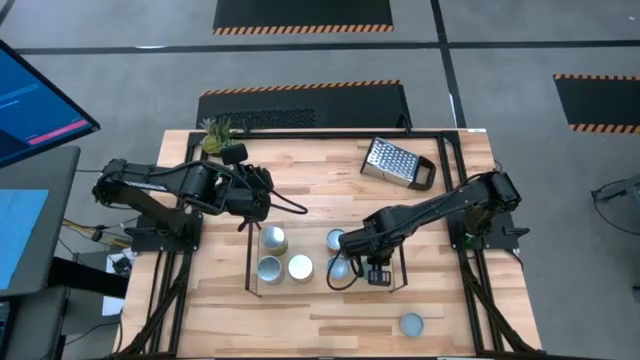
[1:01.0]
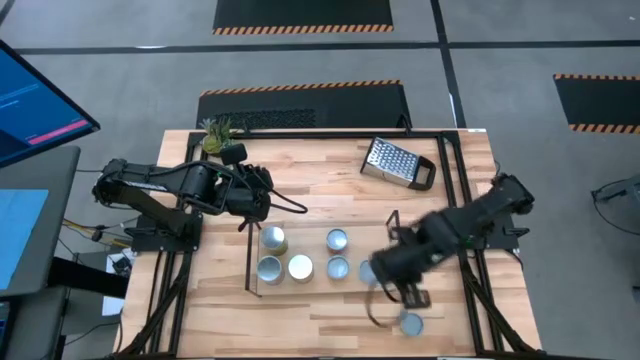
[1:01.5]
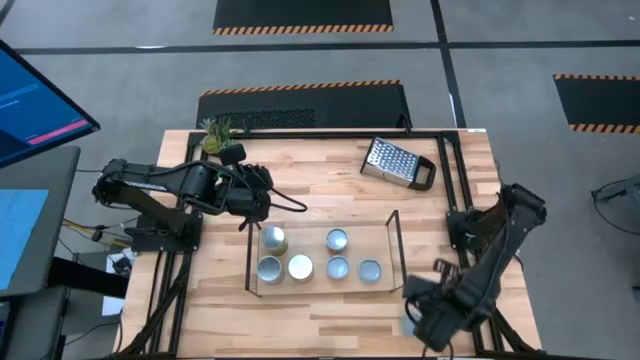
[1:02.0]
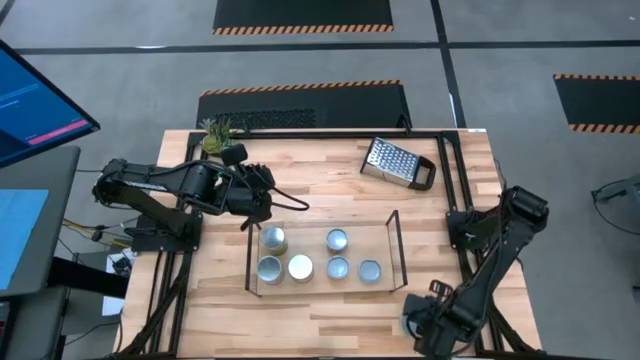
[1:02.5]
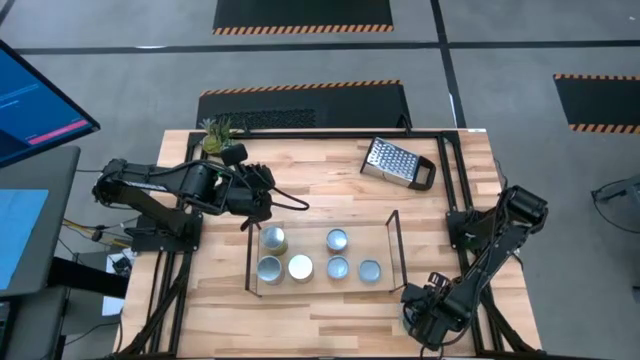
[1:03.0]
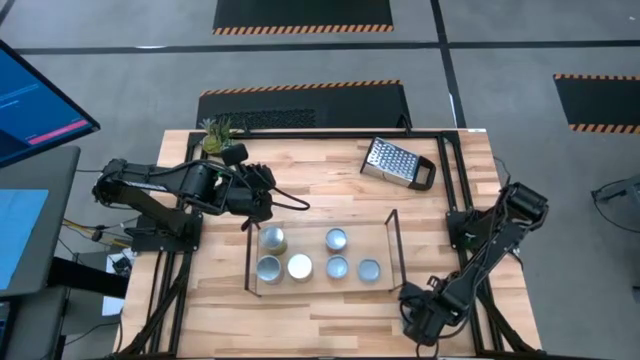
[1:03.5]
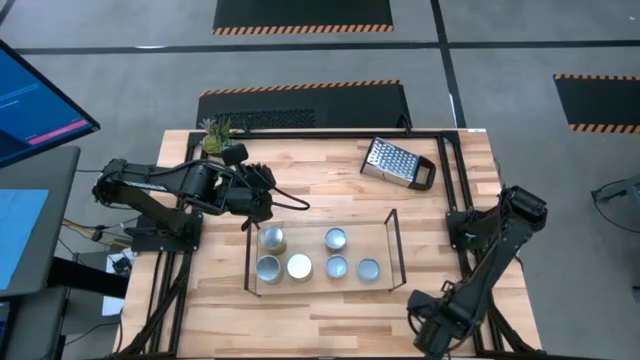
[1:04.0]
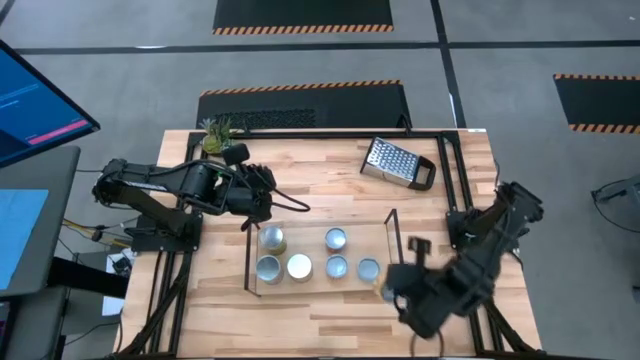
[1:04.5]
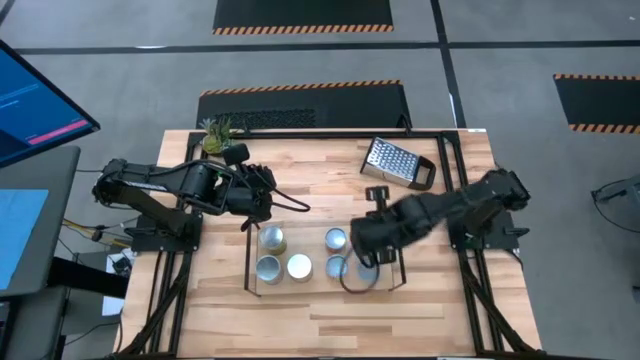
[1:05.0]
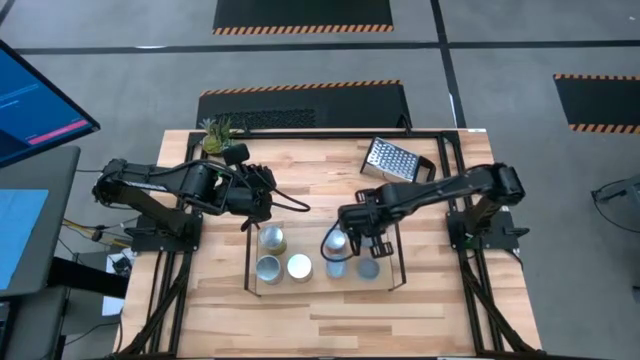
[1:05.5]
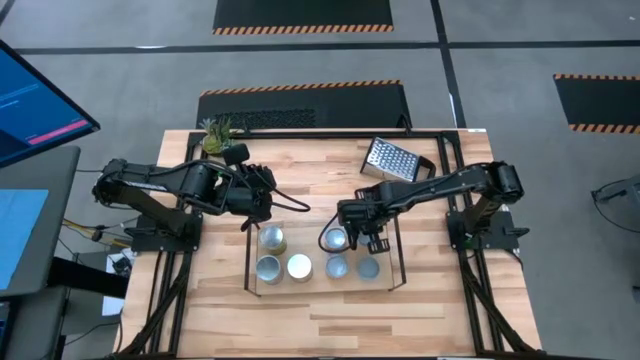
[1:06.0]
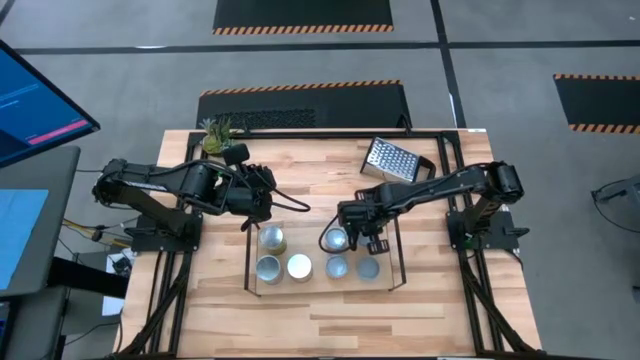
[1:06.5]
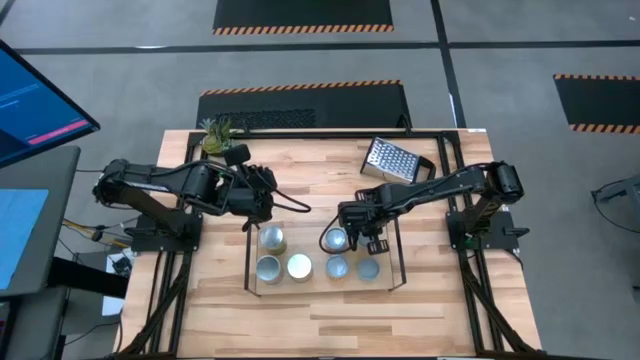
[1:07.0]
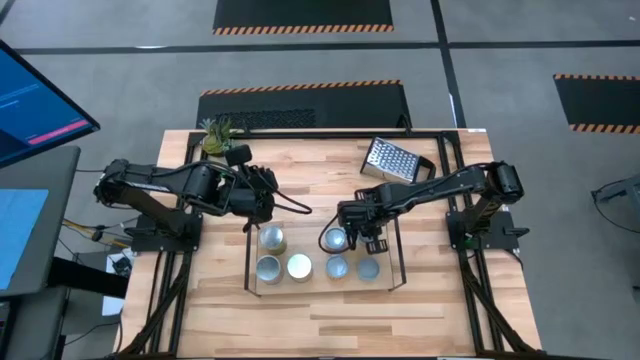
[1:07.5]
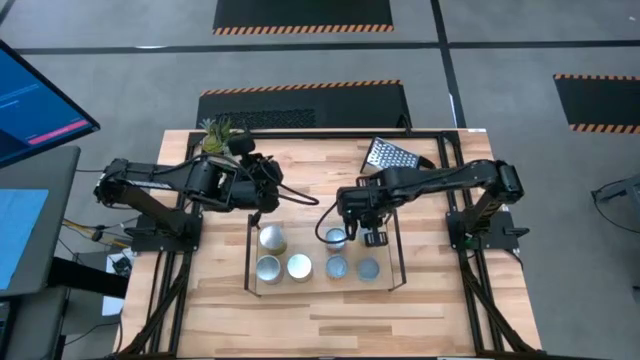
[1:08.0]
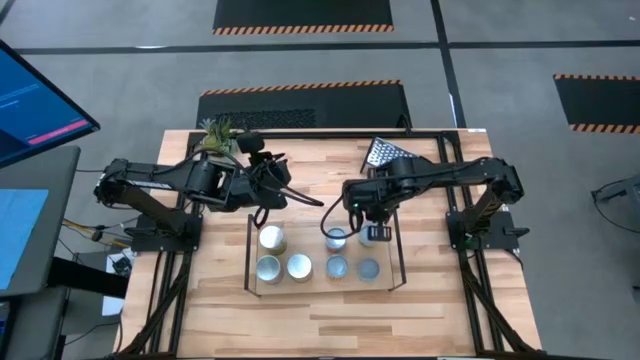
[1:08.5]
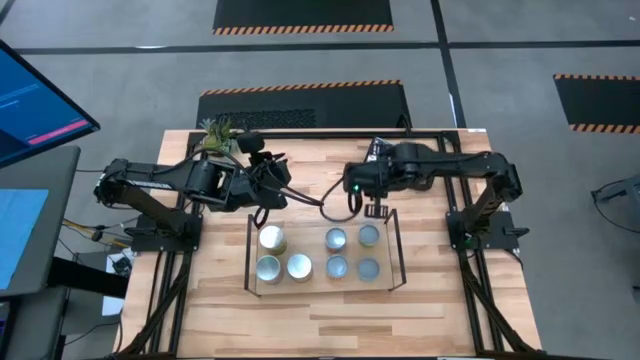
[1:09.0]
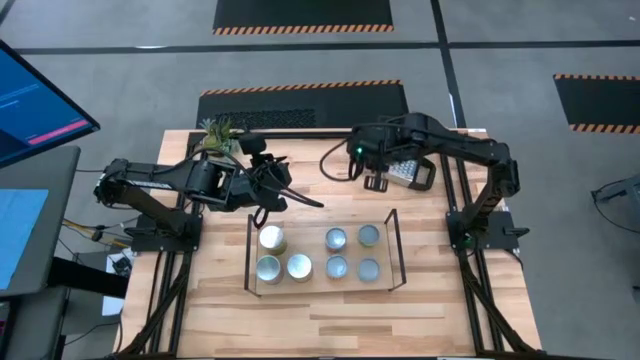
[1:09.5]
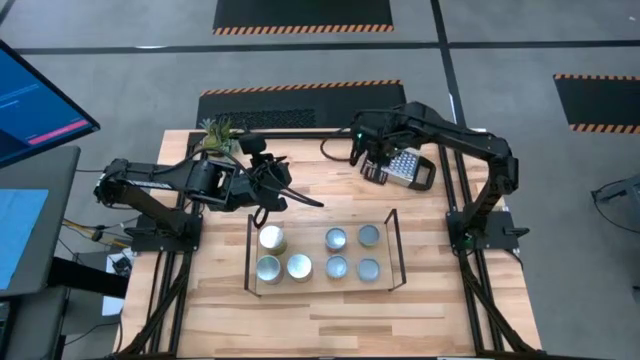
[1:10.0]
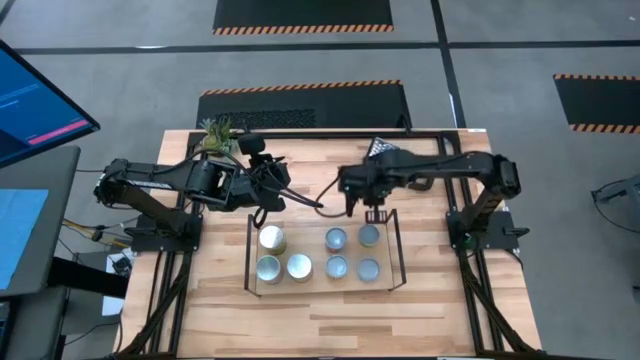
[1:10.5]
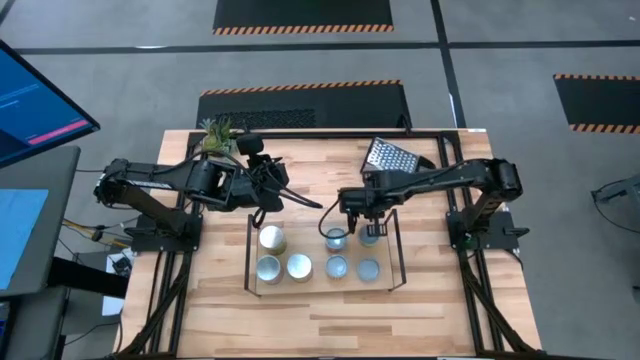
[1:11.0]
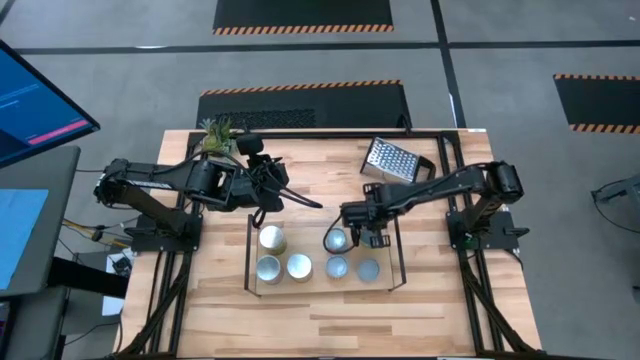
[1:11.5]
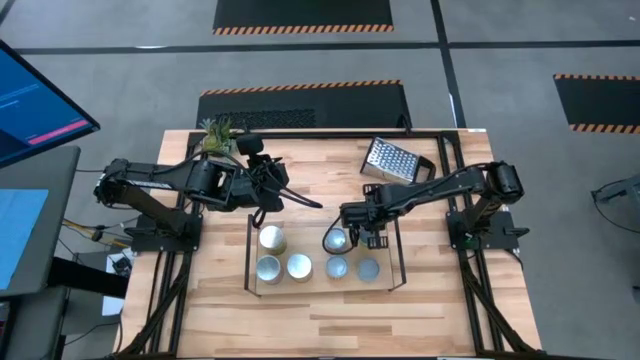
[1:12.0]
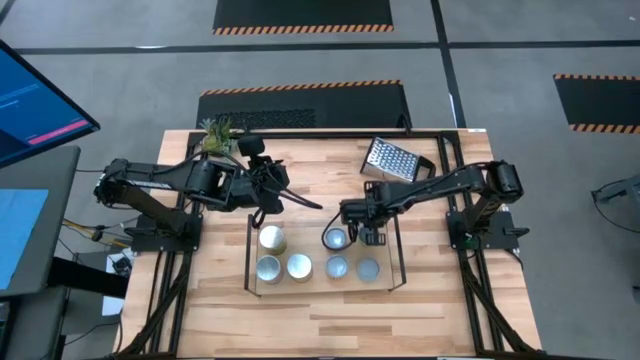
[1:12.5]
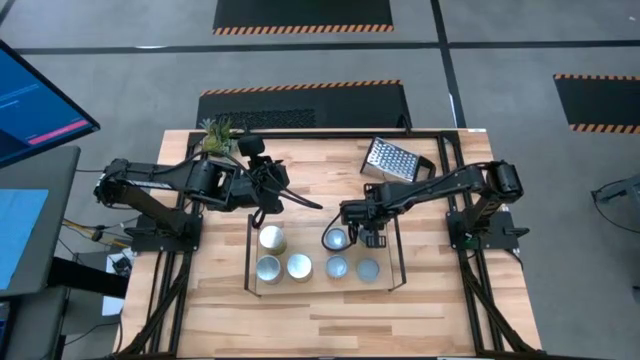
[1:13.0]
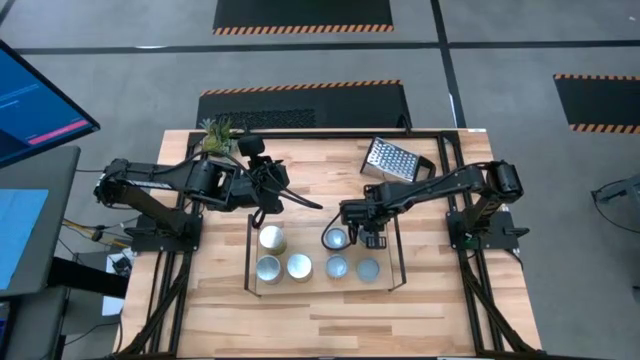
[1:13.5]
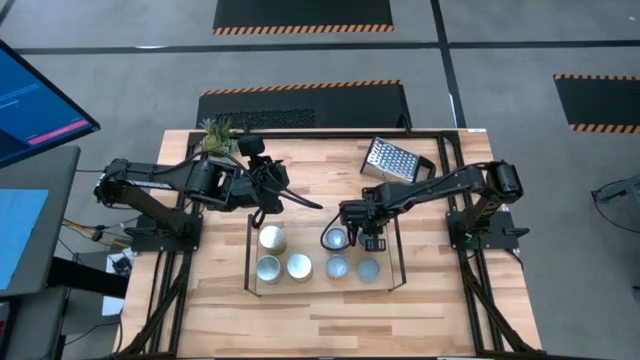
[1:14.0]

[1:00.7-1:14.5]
Task: Pick and place cans onto a shelf
Put the canned mushrooms on the shelf

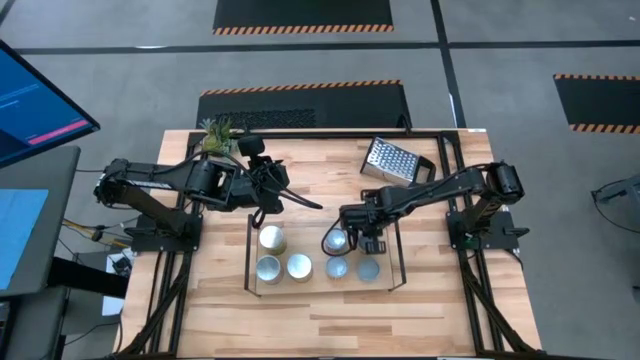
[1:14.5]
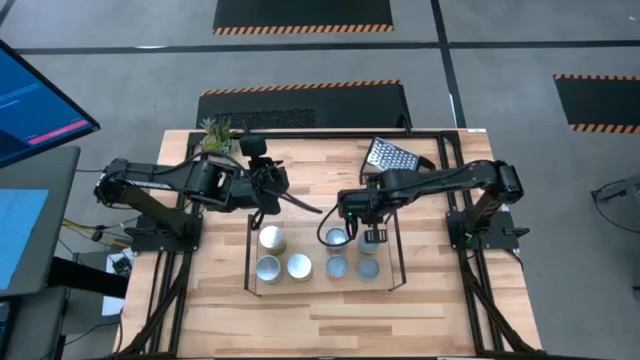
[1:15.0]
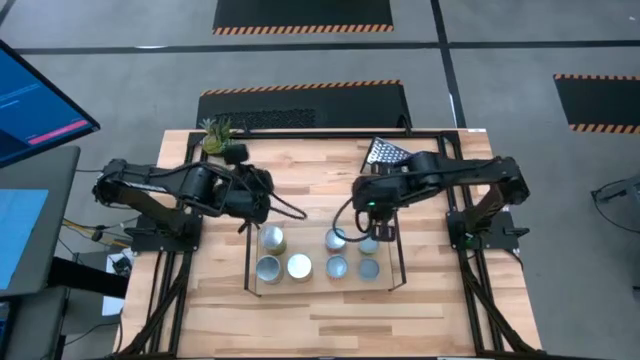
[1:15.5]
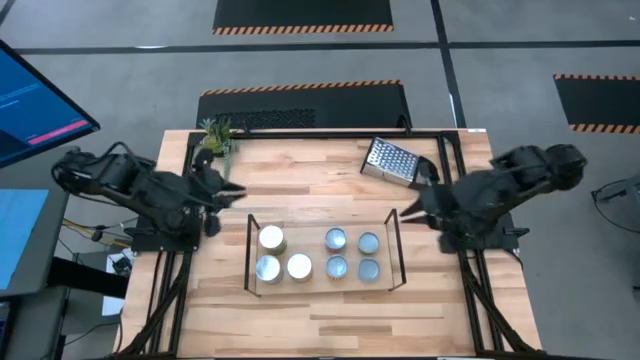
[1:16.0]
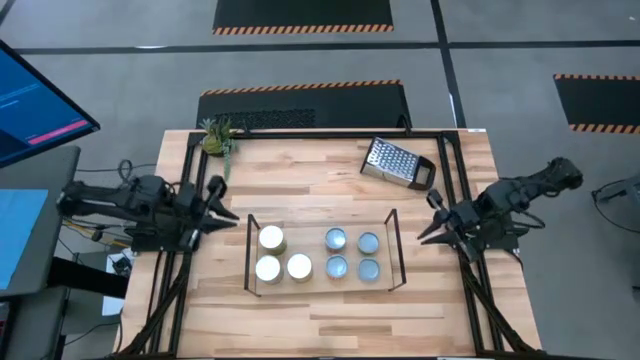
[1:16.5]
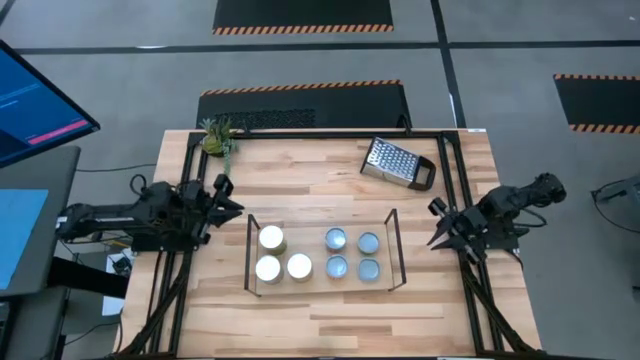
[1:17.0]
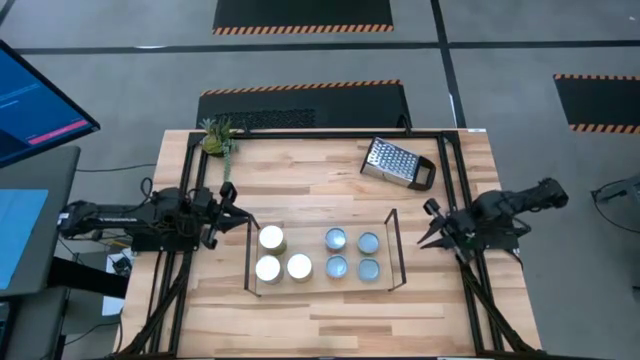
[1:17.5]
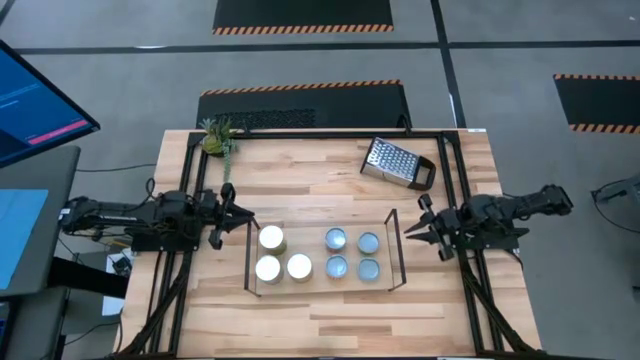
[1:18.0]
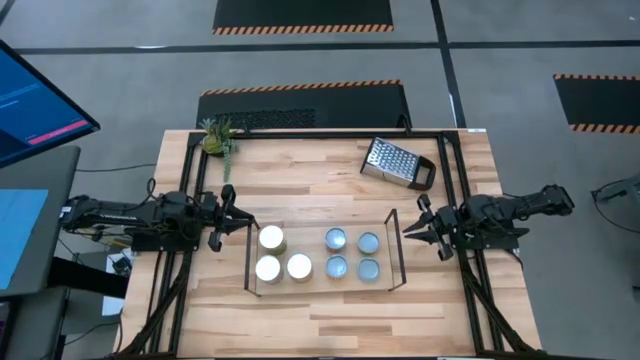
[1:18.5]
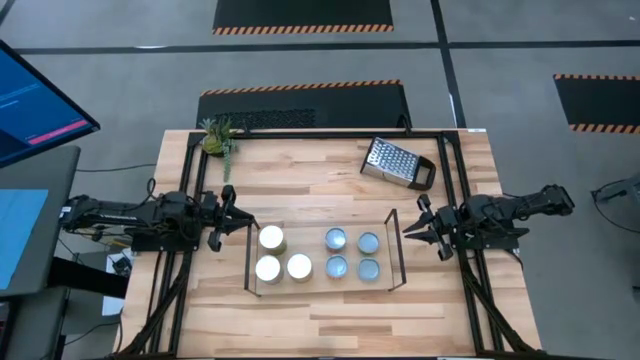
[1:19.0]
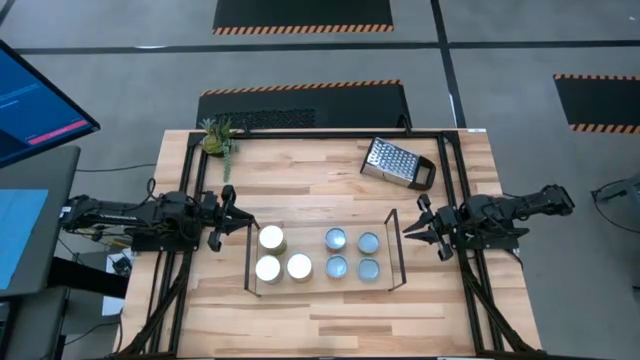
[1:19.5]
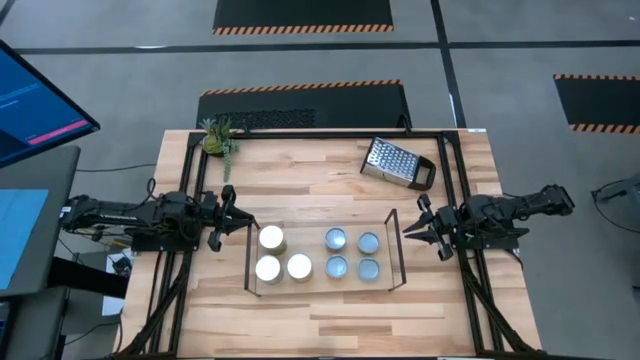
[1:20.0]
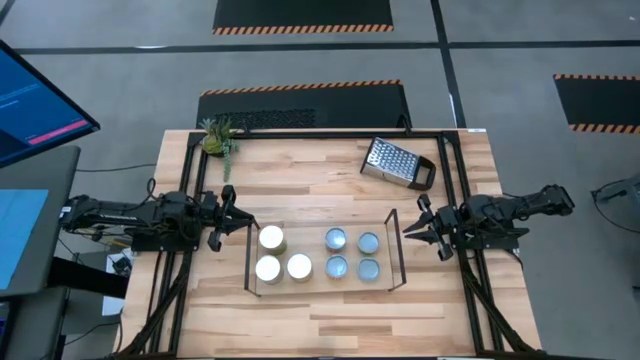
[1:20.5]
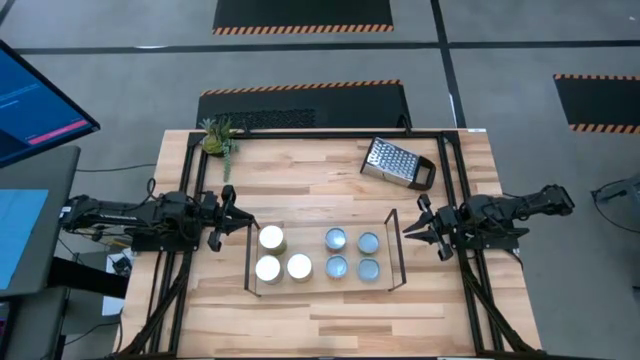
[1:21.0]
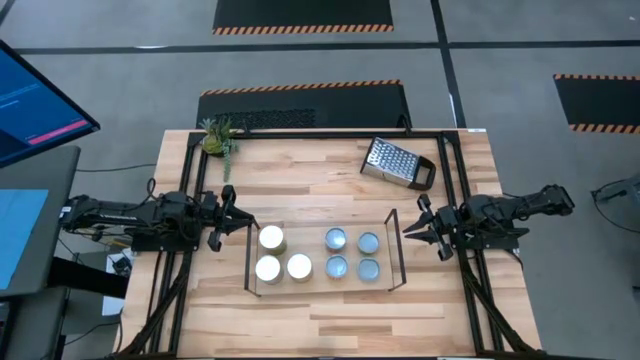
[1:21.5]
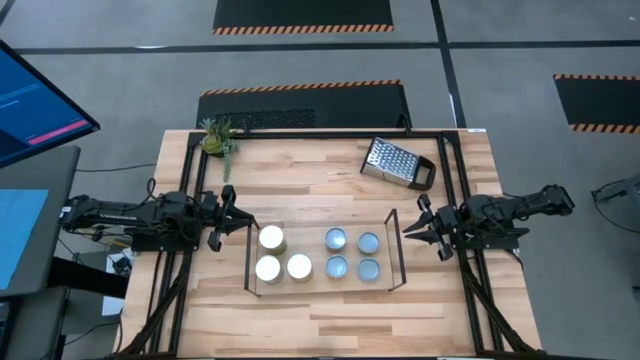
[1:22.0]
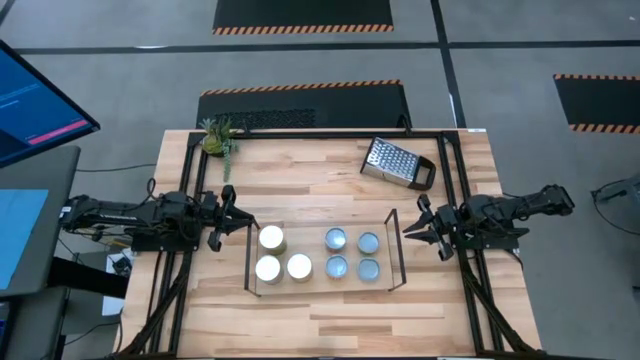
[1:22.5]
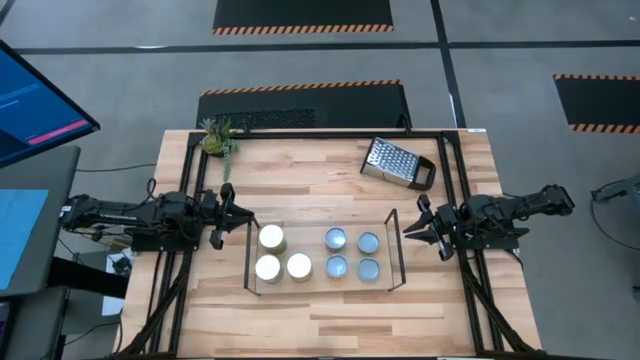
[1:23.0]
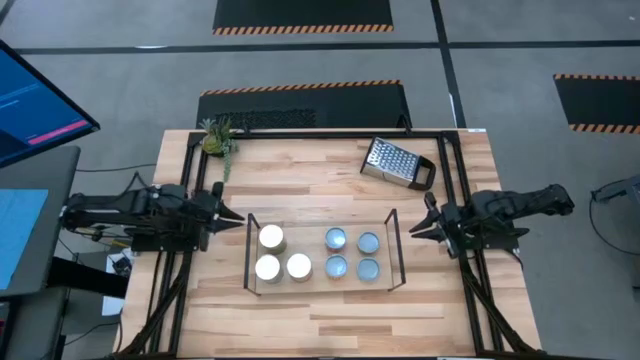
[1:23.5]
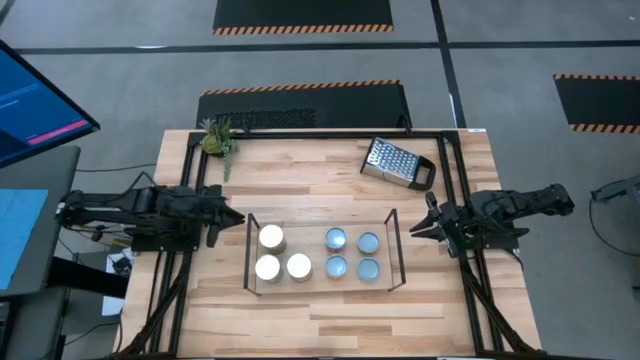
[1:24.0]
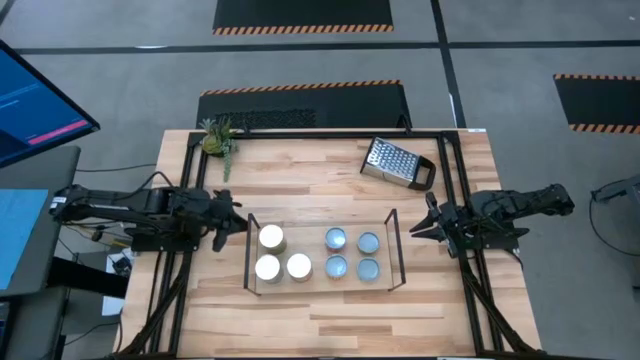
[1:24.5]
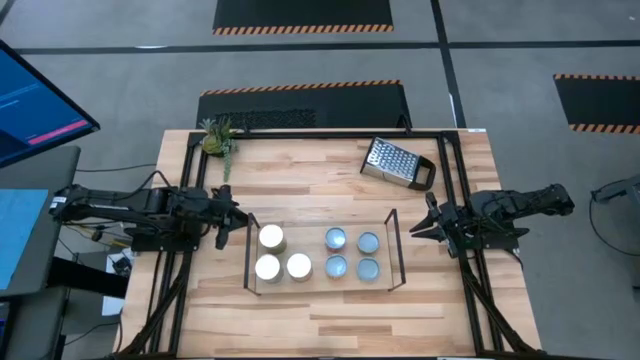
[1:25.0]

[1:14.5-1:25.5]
Adjust the shelf
